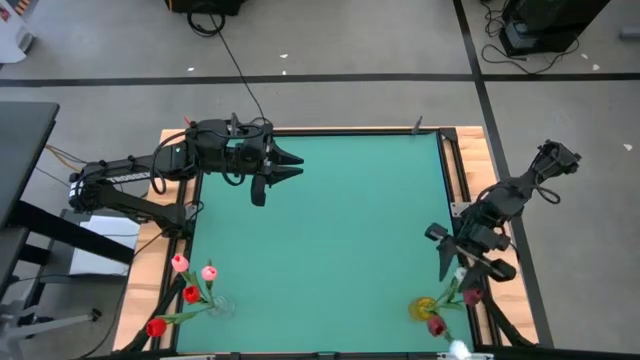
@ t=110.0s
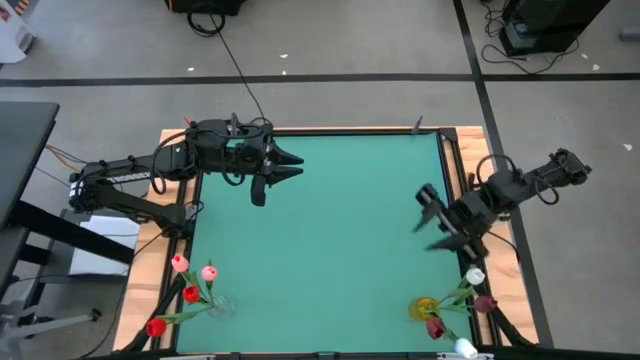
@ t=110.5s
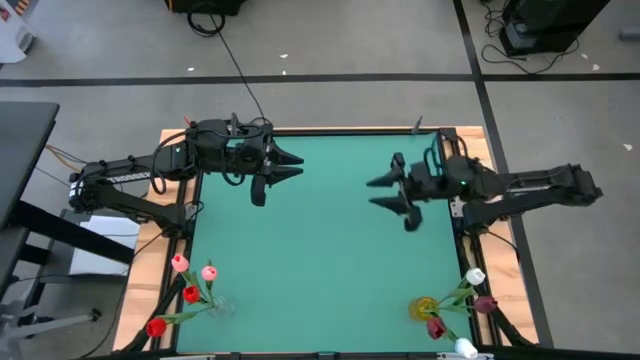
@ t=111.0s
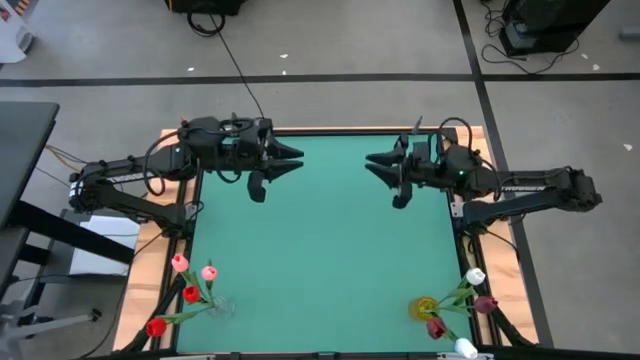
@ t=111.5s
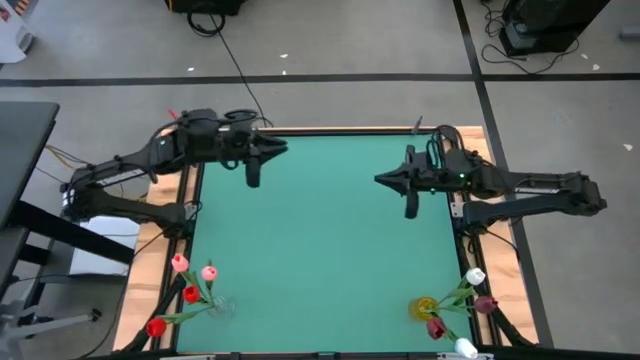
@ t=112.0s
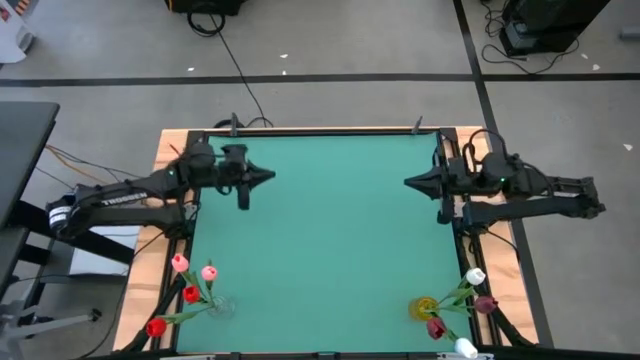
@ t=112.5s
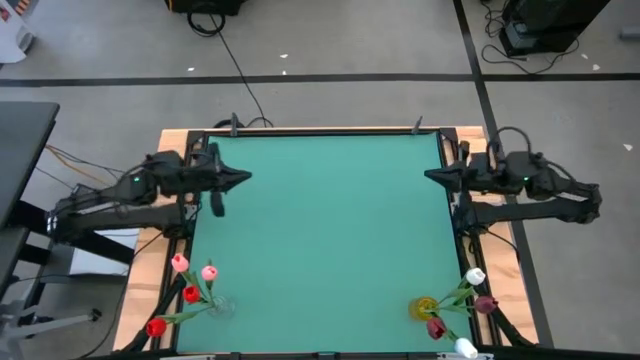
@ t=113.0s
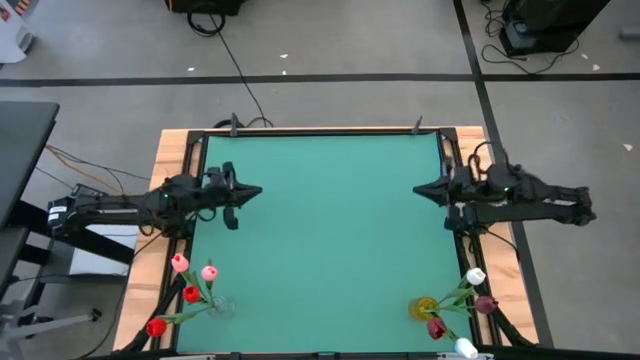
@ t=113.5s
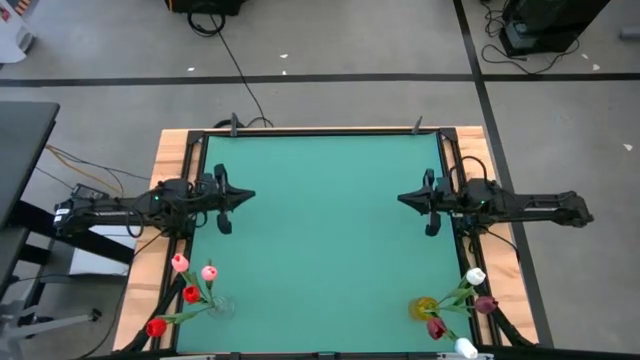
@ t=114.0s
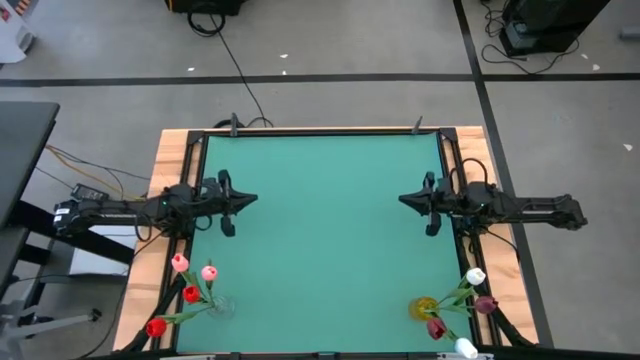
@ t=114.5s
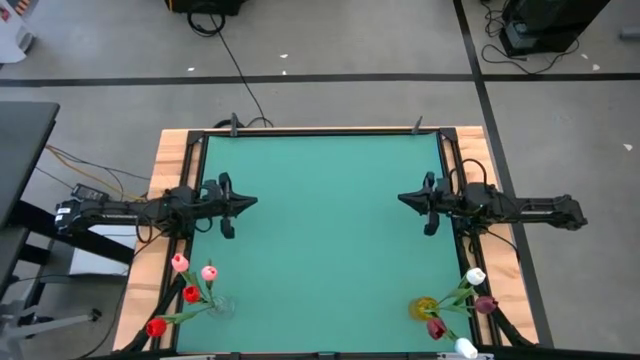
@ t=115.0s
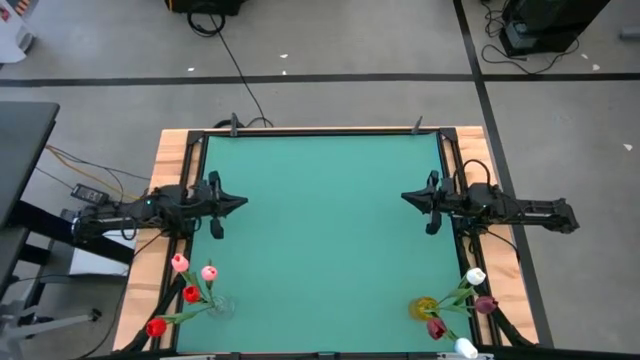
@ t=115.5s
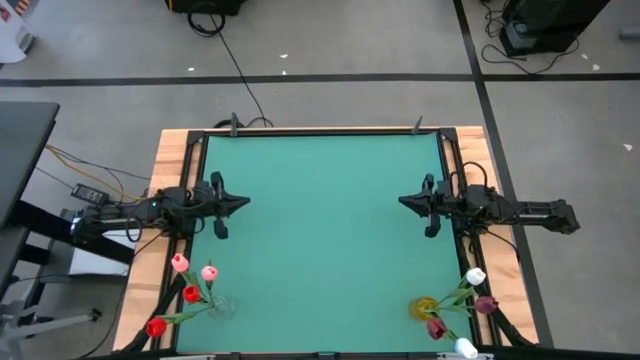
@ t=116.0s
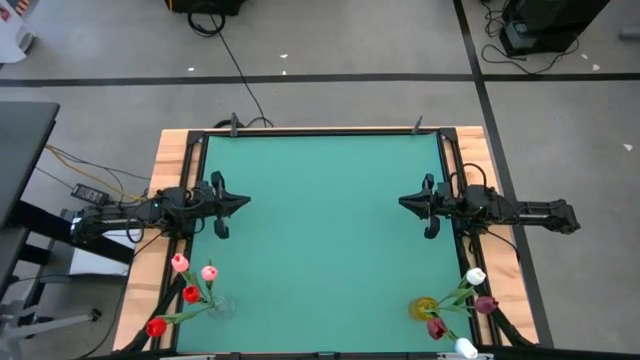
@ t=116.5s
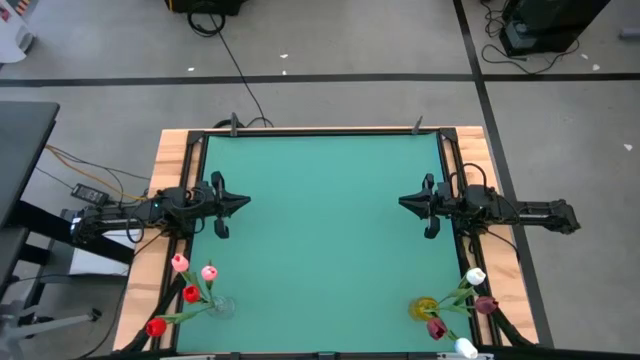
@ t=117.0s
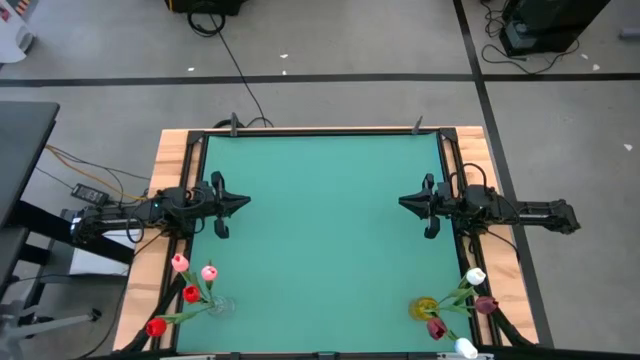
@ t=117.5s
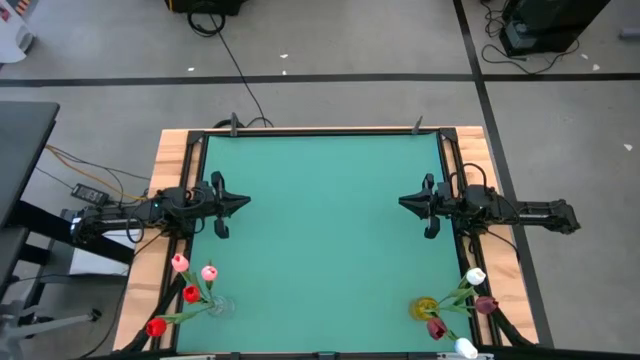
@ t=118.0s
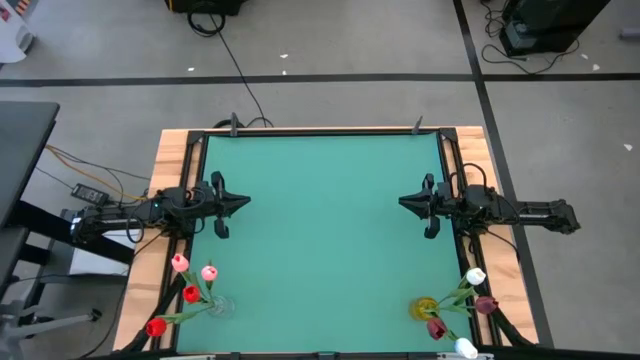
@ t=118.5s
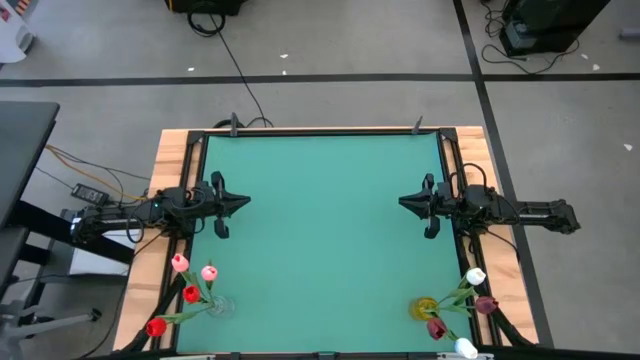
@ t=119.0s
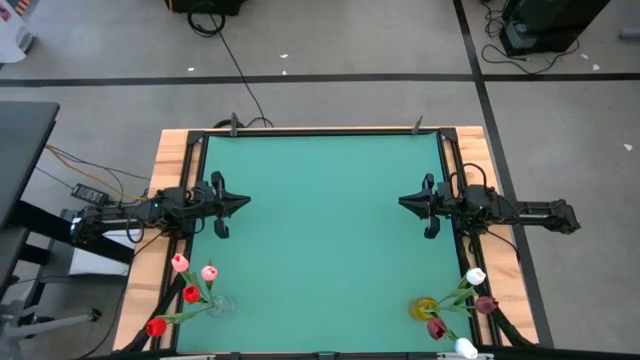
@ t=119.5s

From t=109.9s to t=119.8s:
Task: Sort flowers into vase by color
Return to Home Position

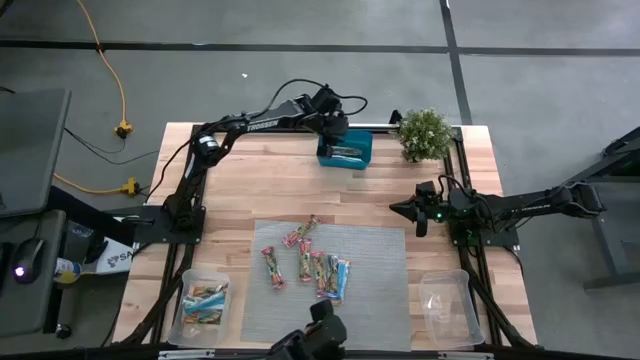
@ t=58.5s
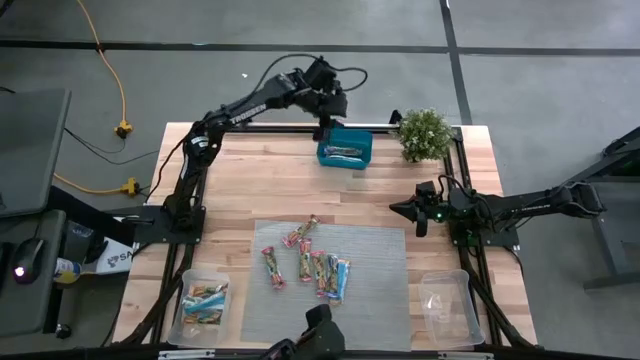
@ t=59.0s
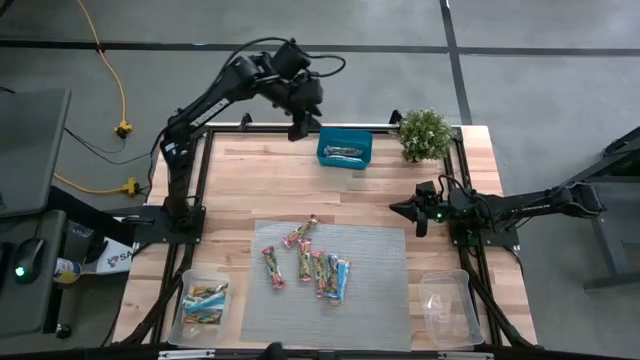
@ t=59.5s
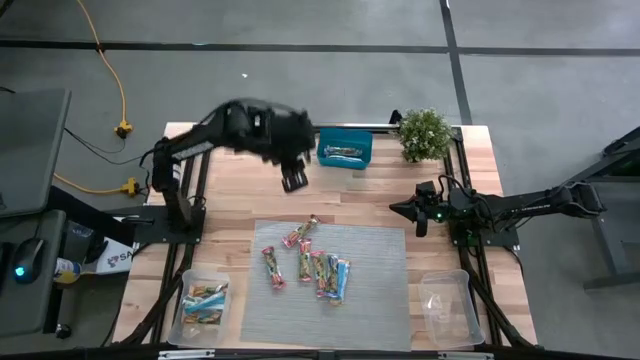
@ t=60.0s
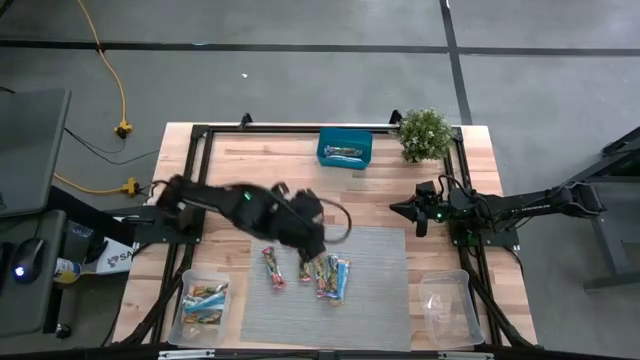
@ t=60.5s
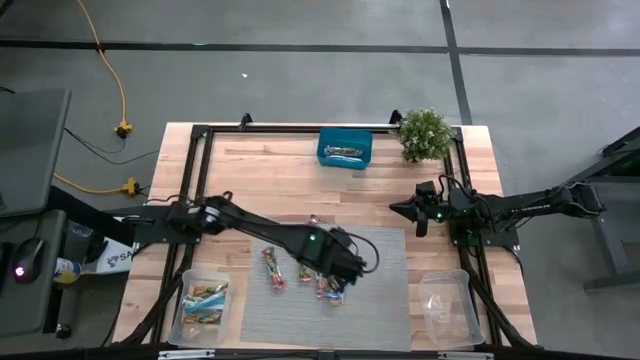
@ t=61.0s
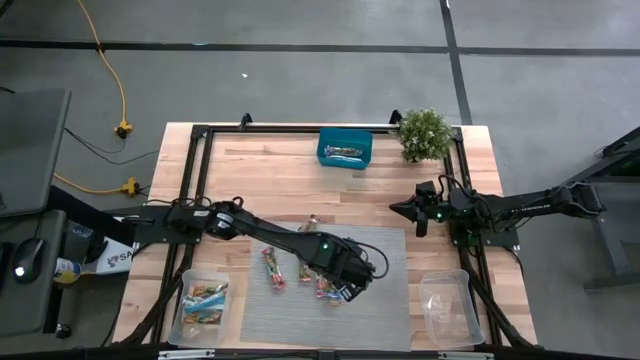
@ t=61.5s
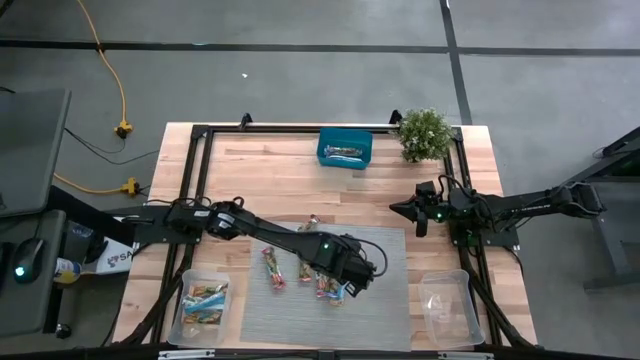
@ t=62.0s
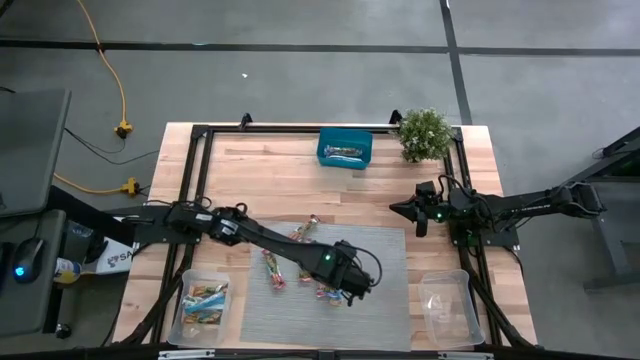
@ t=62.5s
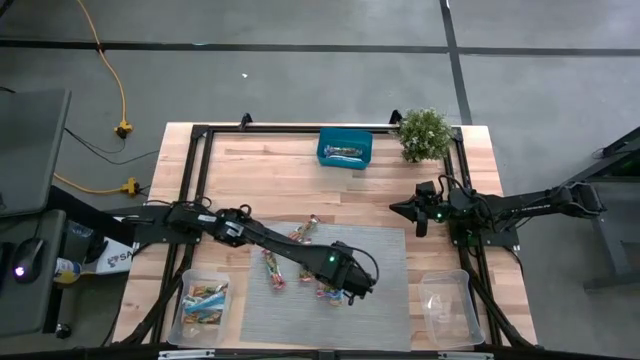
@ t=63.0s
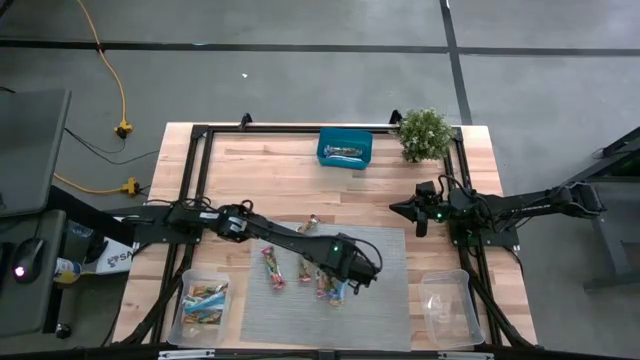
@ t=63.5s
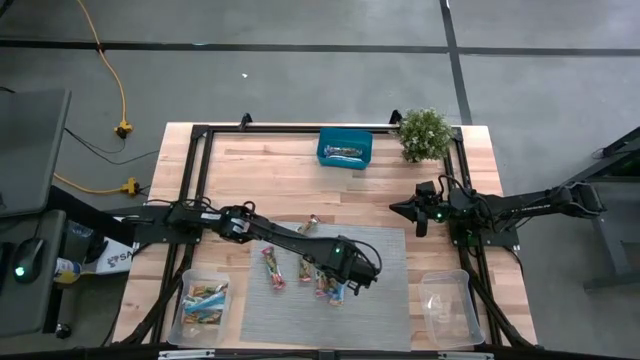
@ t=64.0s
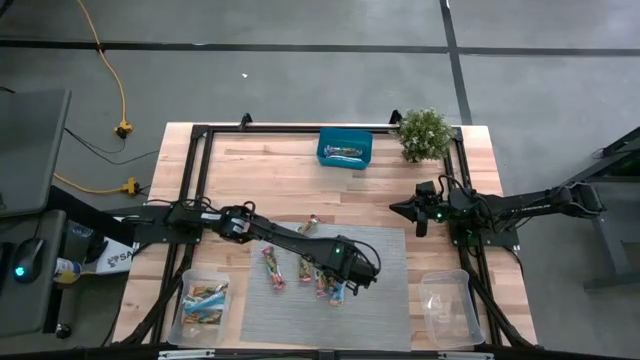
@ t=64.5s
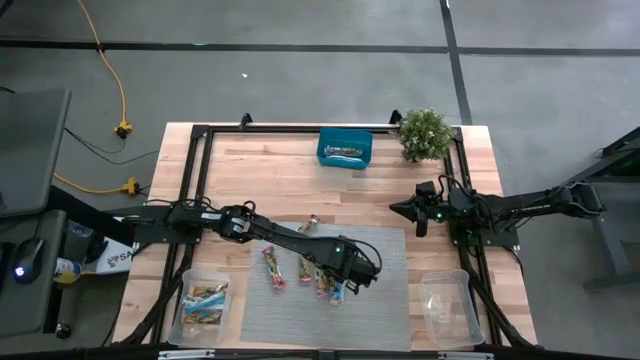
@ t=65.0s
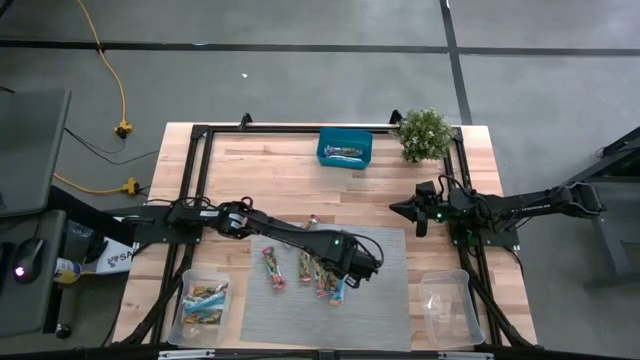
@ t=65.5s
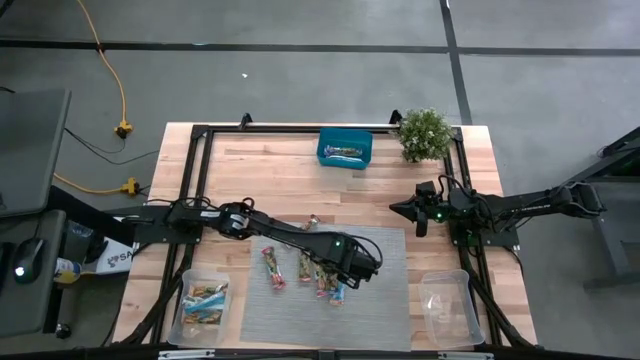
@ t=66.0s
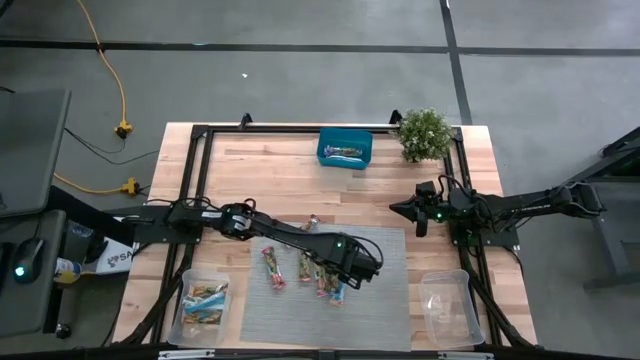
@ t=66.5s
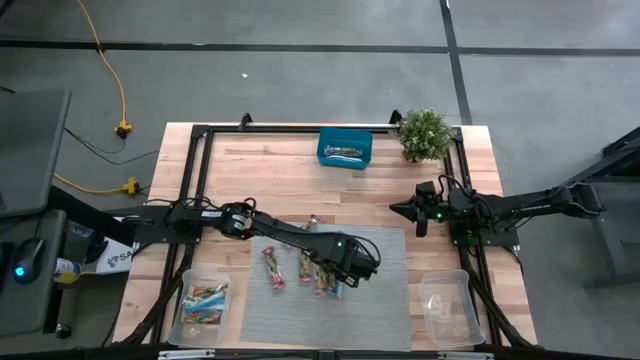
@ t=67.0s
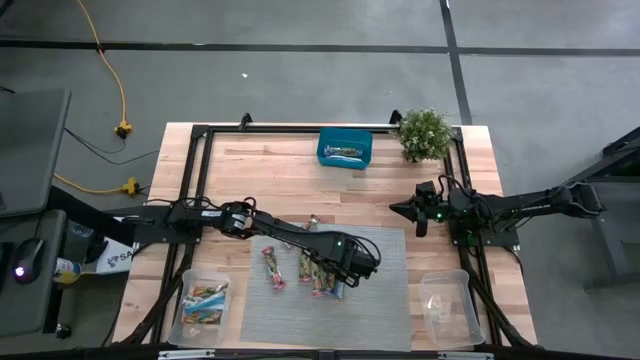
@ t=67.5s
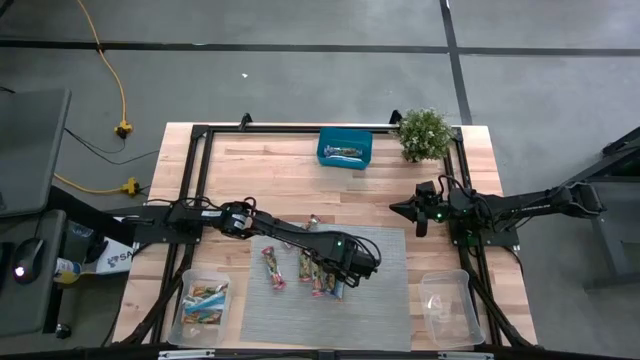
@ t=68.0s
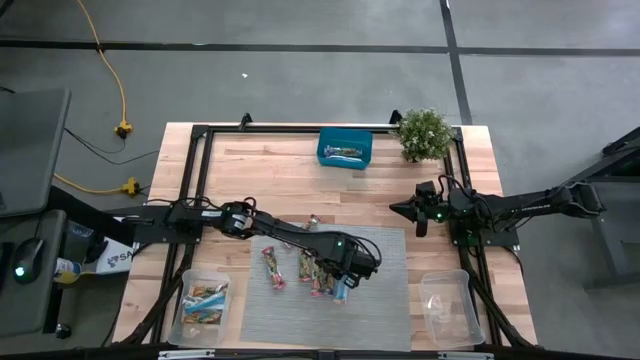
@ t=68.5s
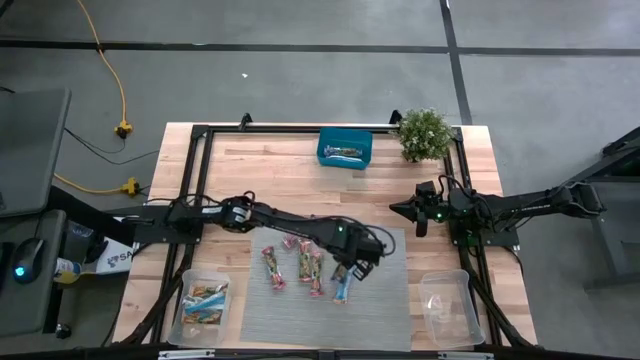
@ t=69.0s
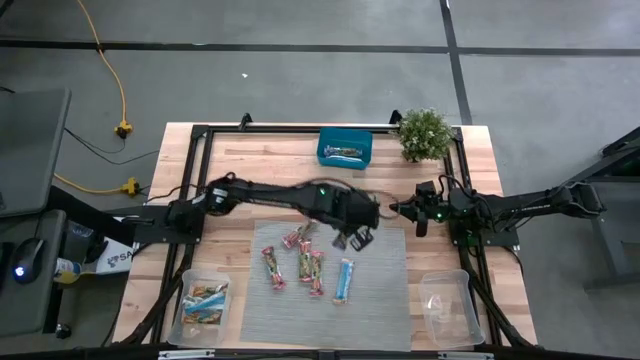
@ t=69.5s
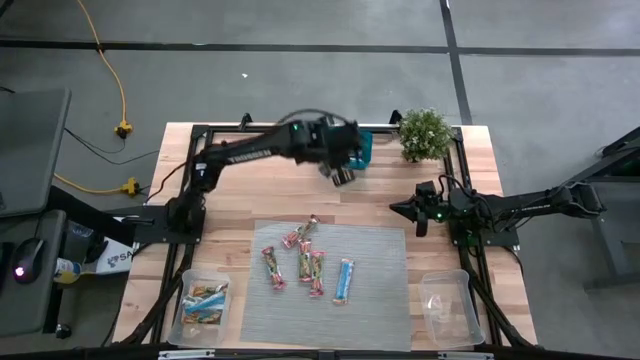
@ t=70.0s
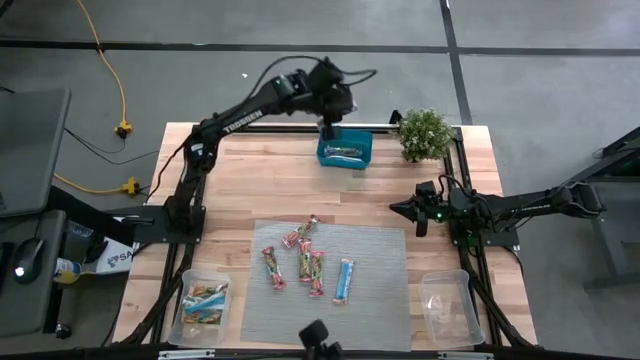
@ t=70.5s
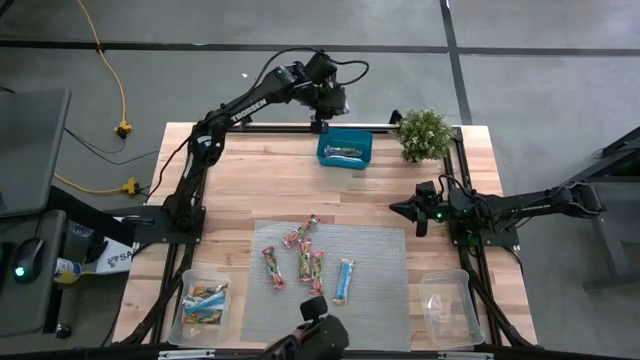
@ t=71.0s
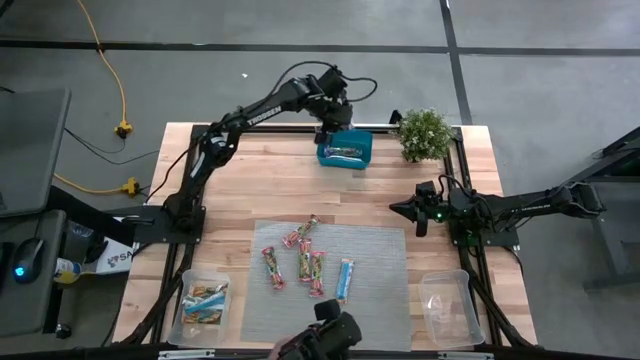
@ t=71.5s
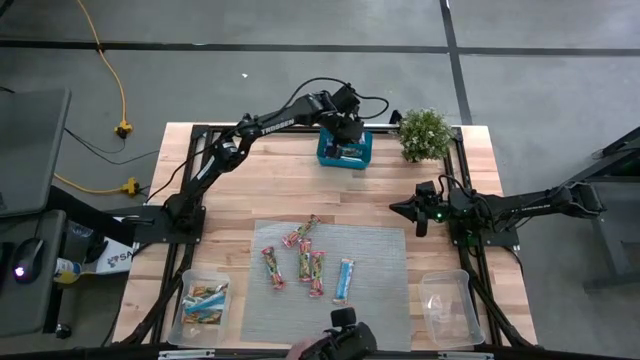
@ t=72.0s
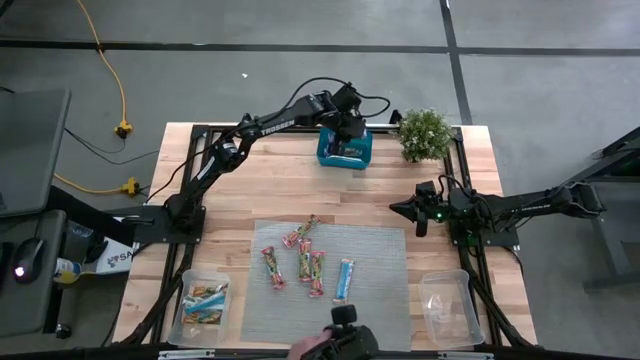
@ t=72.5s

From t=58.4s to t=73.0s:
Task: Pick and place Granola Bars by type
Put the blue granola bar into the blue bin
